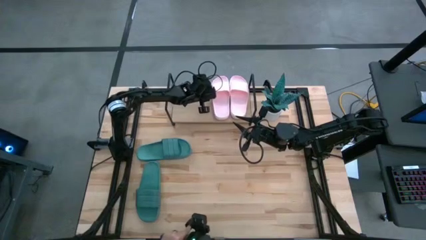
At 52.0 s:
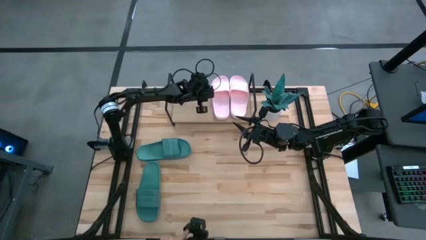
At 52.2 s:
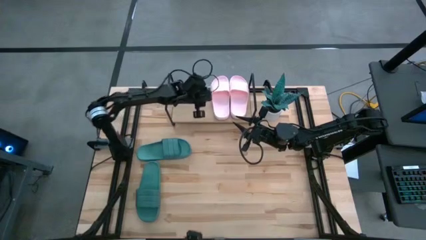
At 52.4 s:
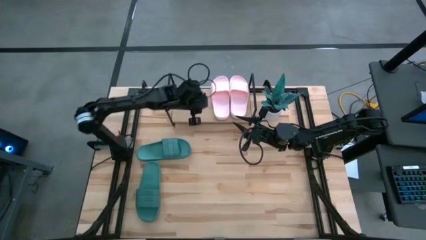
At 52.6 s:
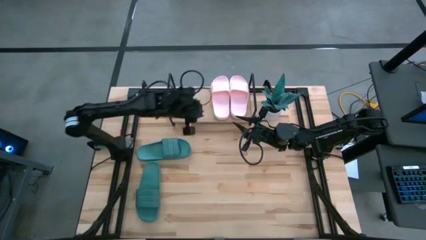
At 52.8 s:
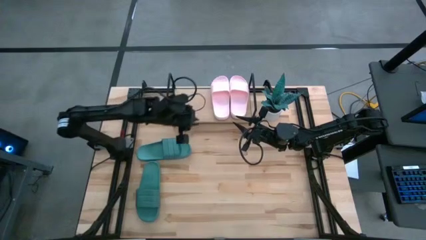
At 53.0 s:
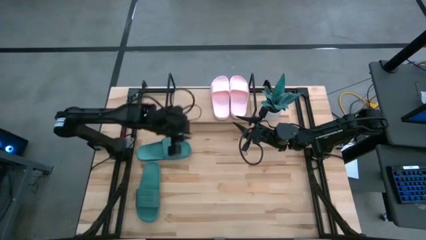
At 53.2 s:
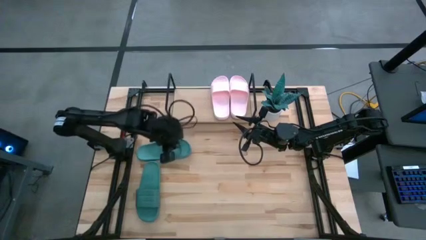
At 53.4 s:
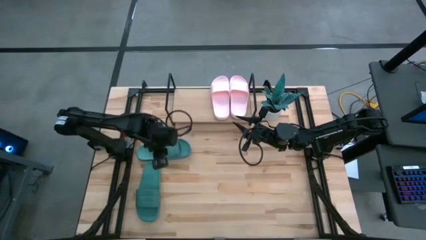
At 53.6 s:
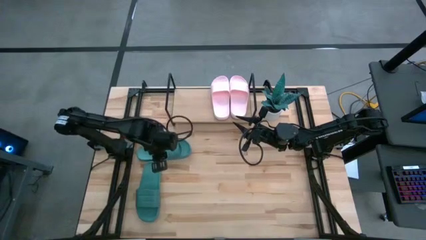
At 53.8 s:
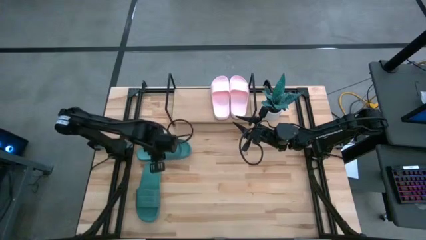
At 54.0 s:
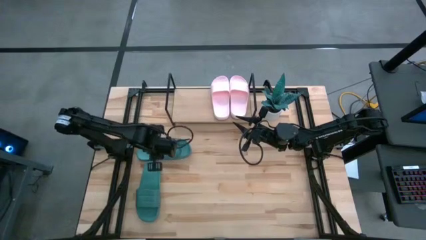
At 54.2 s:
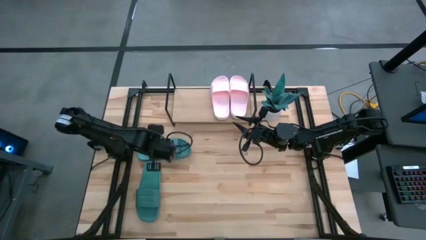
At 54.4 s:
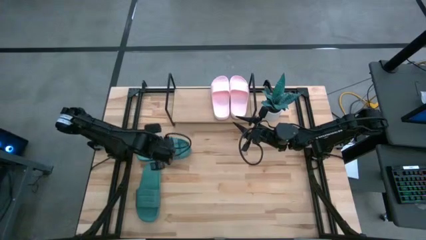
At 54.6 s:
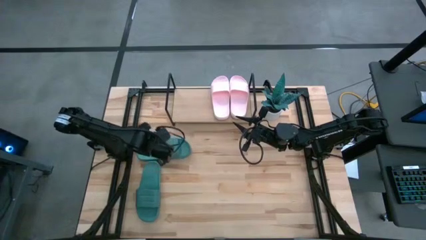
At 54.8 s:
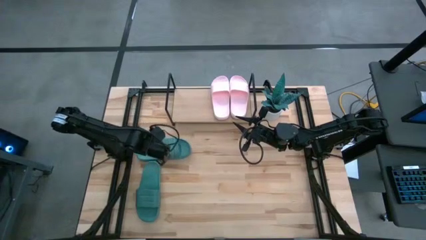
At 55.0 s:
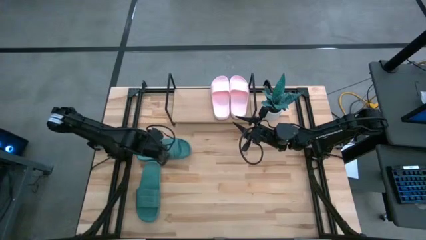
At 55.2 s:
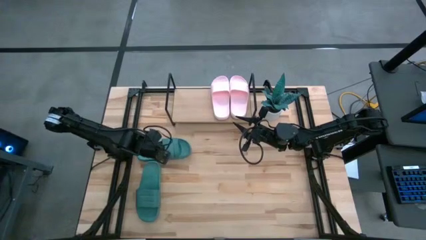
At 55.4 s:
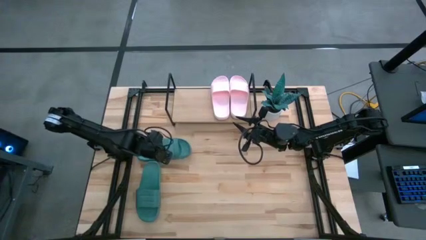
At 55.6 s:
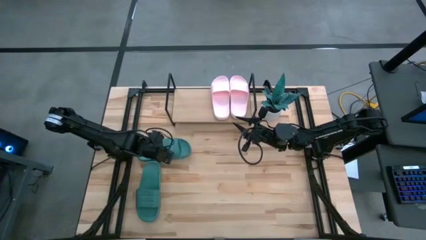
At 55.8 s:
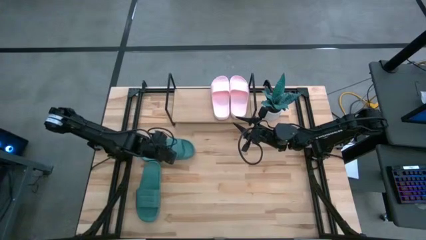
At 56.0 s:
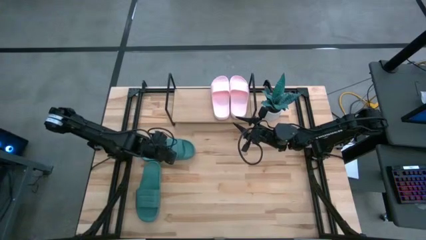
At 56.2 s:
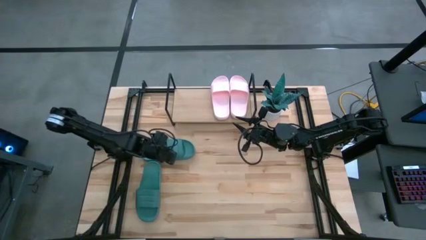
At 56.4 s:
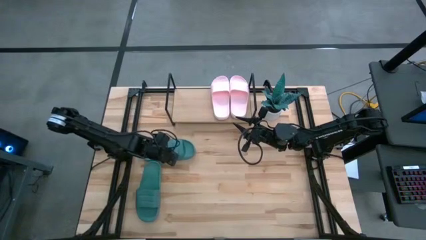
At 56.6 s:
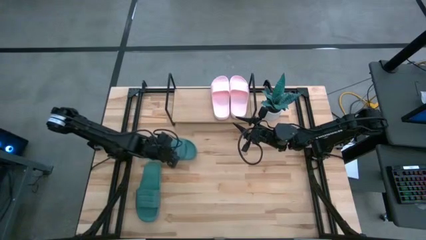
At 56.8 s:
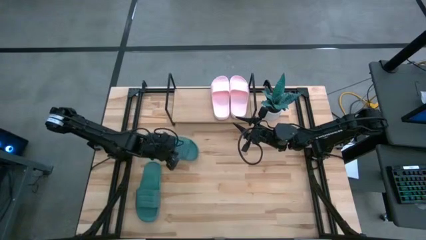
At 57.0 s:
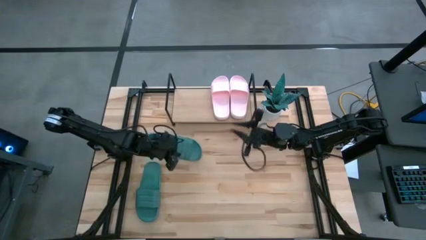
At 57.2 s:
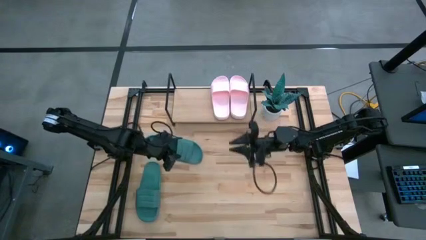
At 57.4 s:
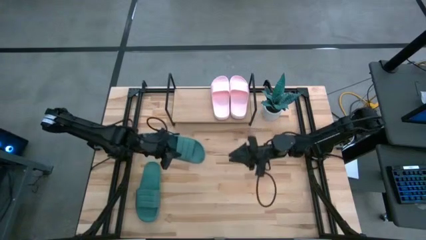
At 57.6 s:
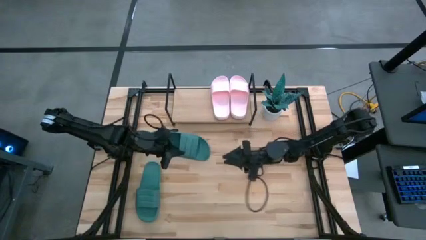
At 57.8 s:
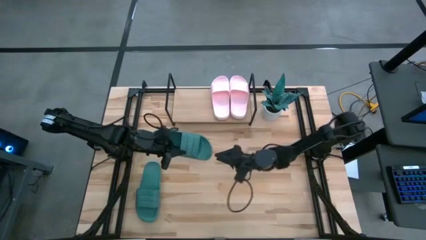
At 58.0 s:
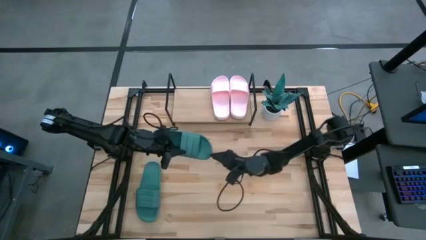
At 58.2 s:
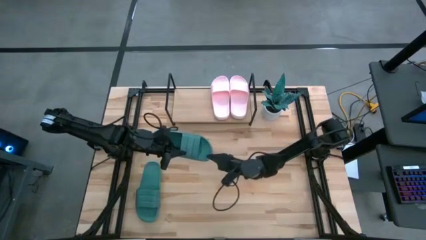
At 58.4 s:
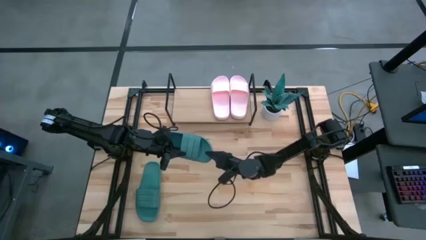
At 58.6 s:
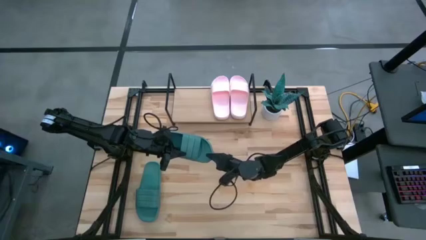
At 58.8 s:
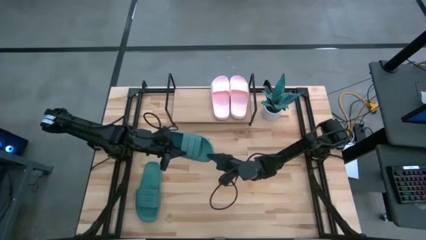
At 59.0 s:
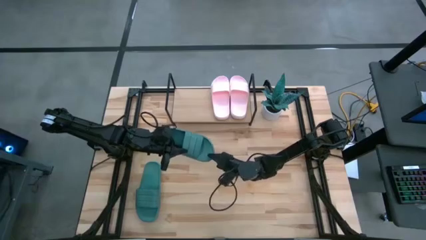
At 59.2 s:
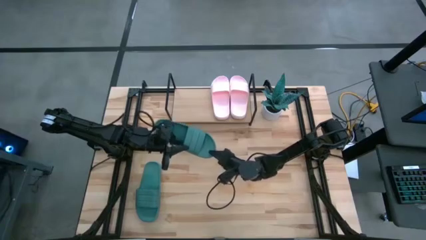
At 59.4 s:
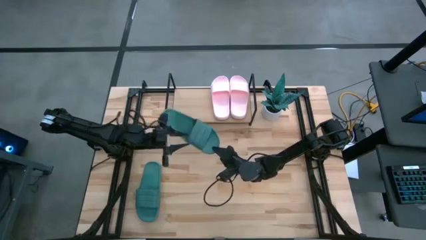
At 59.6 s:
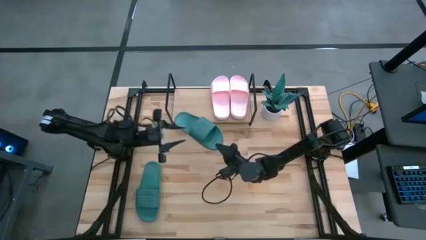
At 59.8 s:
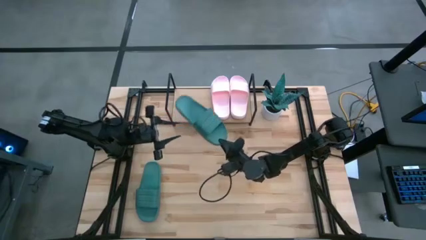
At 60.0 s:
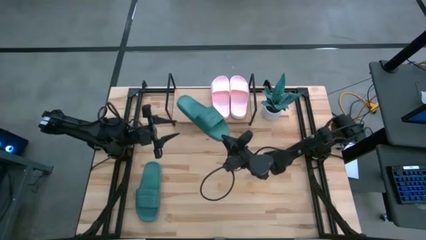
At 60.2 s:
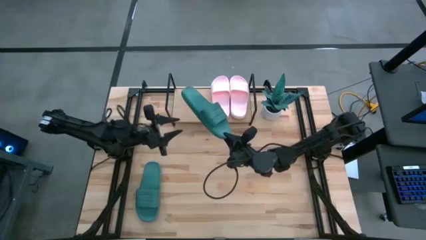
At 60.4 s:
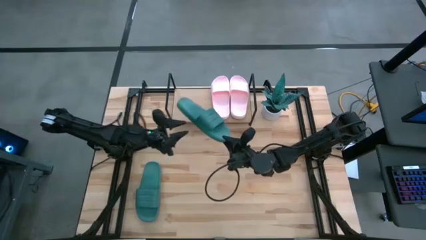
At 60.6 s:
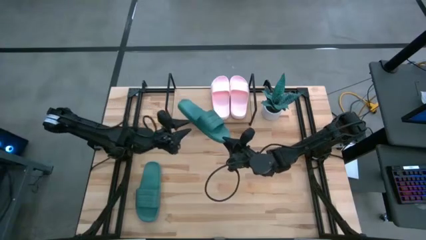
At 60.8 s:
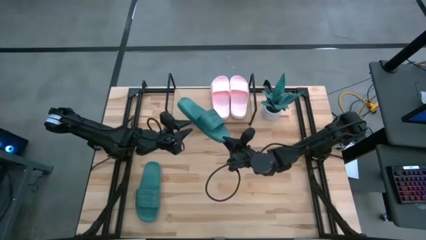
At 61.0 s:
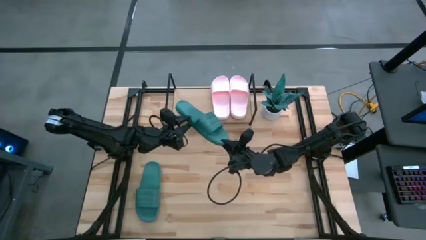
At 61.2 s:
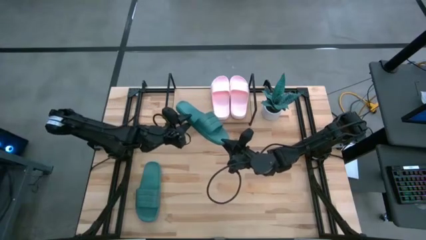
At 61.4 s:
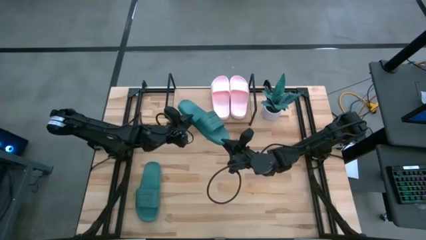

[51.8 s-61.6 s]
Task: Pick and place slides into the shelf
Put the top green slipper on the shelf

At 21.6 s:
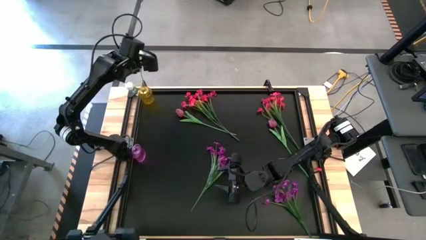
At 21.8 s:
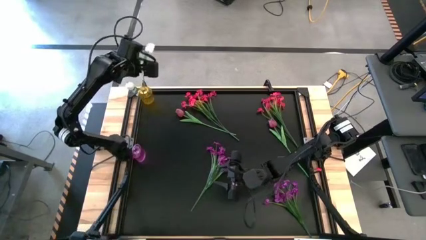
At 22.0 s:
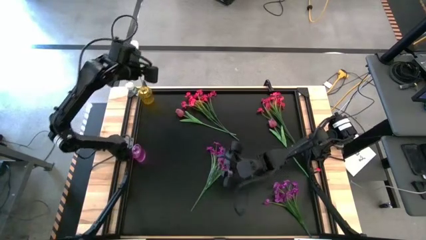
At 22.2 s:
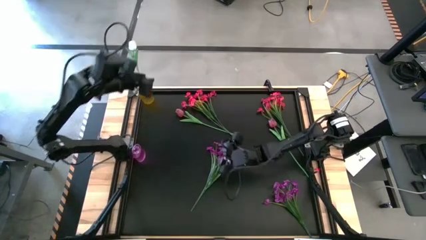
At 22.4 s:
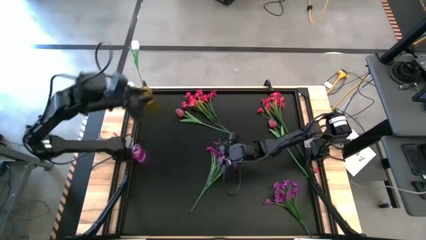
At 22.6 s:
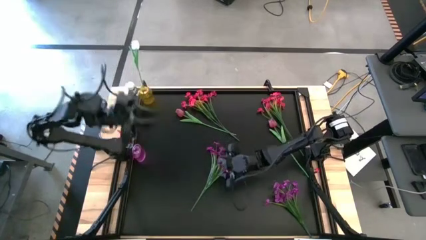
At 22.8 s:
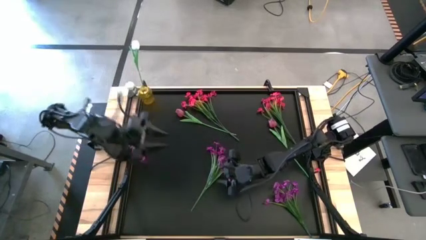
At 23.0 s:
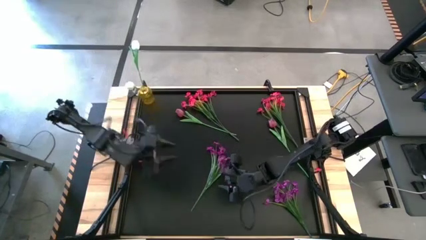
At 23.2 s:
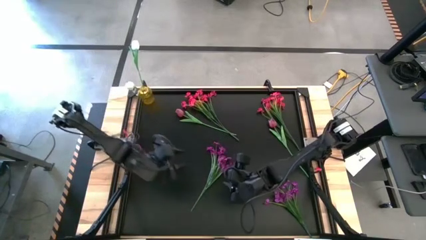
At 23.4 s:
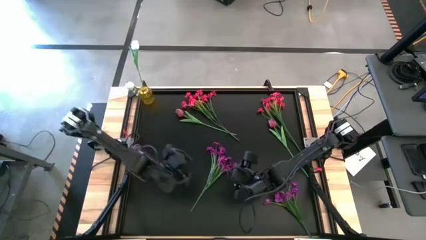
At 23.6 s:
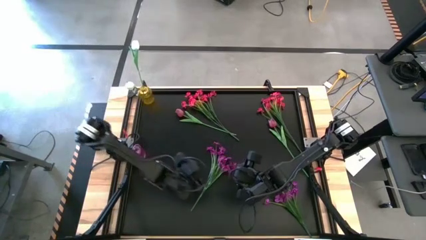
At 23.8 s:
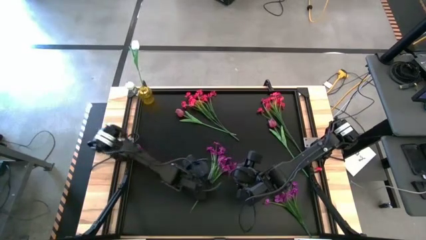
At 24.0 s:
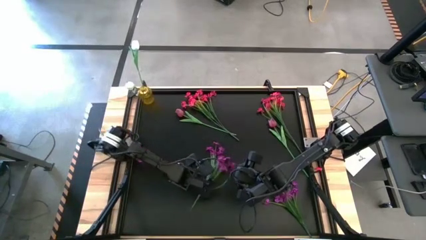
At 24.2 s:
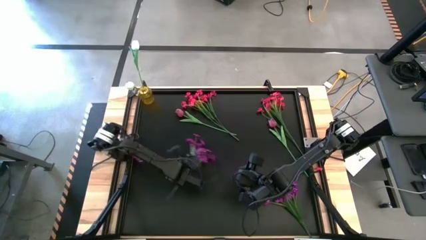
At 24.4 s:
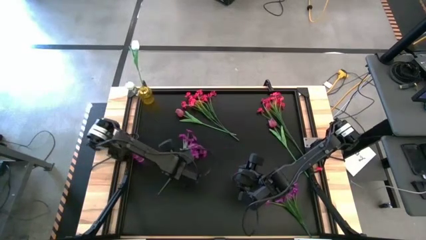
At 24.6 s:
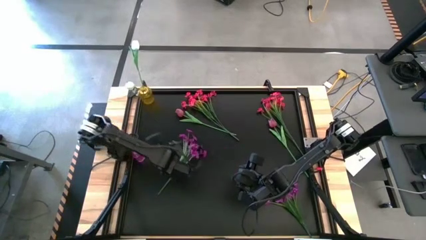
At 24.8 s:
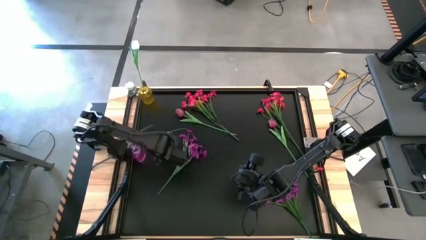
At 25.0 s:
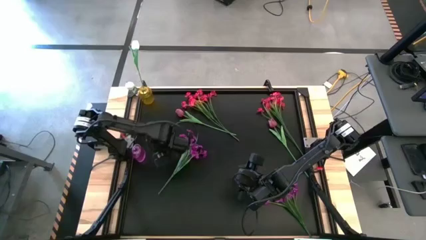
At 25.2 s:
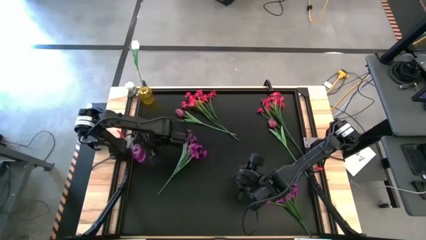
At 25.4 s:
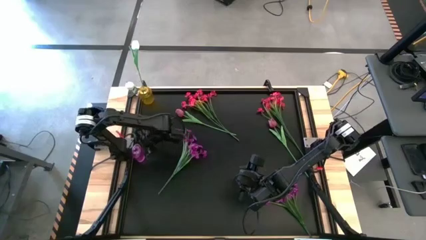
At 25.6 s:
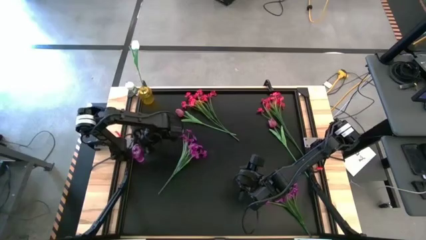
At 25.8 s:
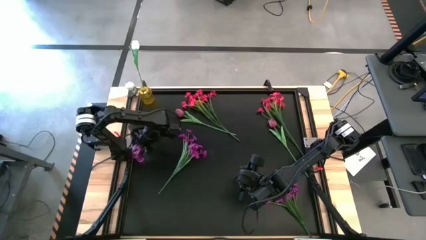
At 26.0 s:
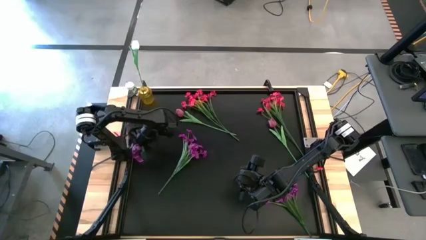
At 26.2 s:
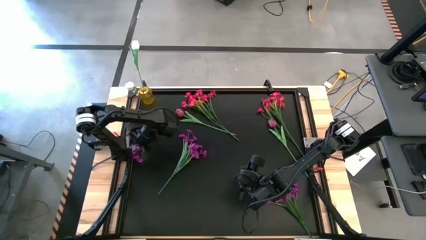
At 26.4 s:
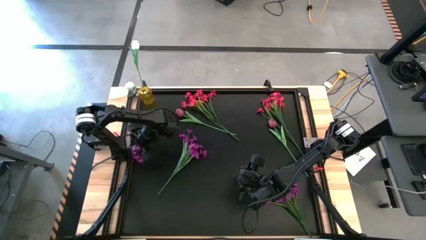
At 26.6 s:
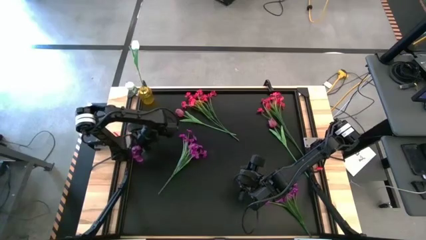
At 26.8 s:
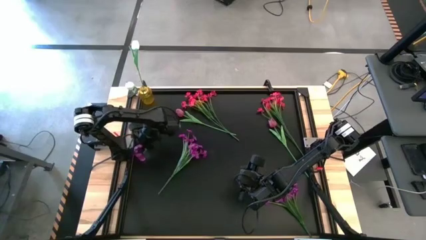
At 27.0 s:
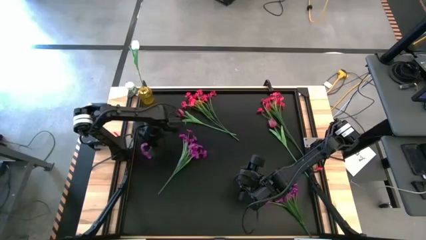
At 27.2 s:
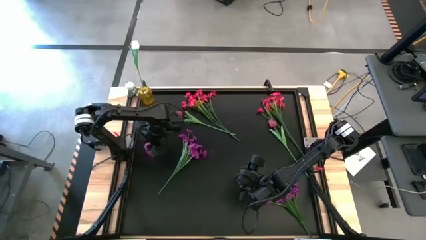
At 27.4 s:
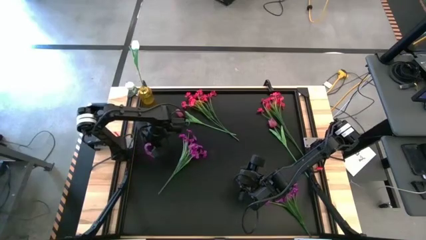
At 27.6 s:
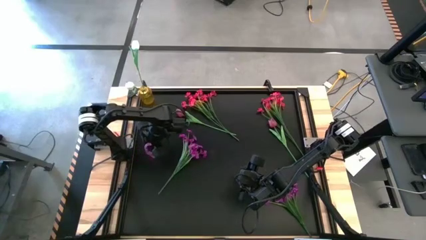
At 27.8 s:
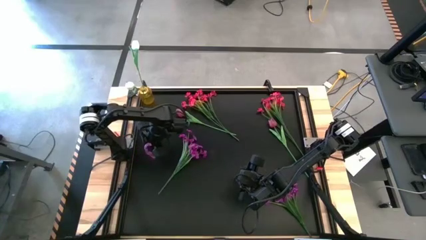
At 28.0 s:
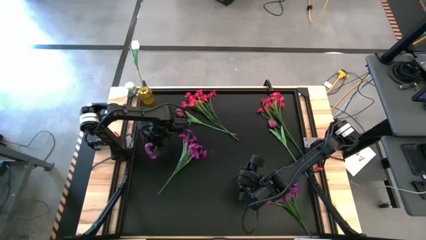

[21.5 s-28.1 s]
Task: Sort flowers into vase by color
Adjust the purple vase on the table
